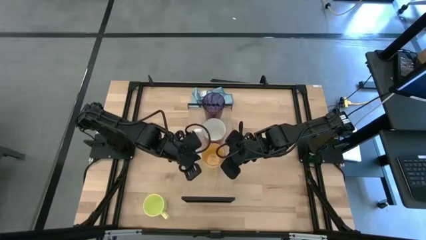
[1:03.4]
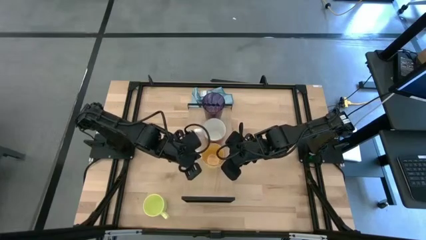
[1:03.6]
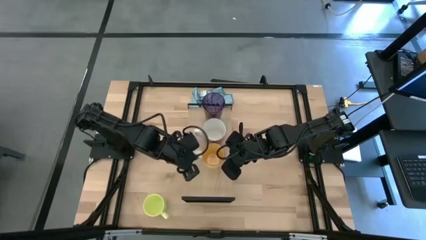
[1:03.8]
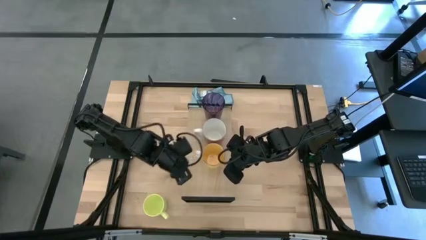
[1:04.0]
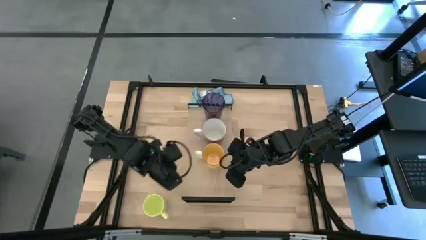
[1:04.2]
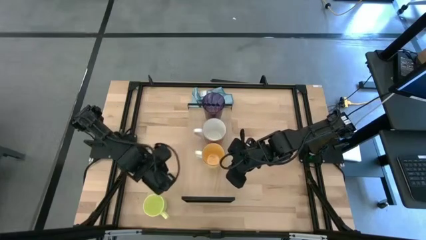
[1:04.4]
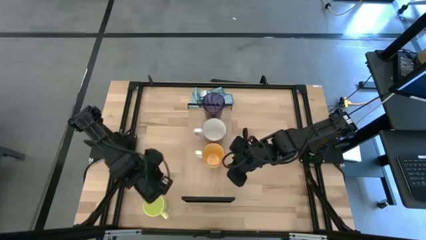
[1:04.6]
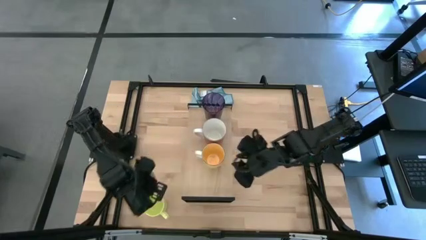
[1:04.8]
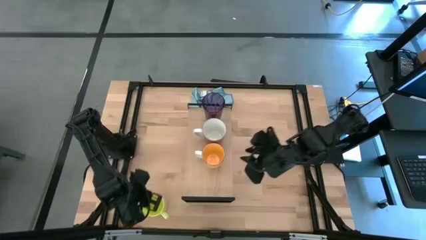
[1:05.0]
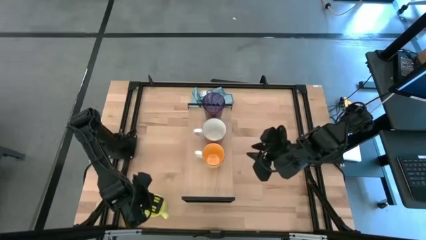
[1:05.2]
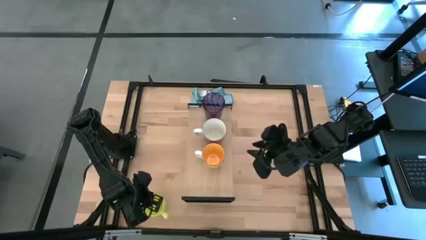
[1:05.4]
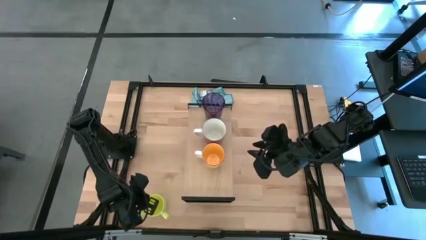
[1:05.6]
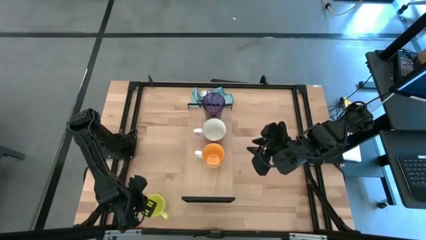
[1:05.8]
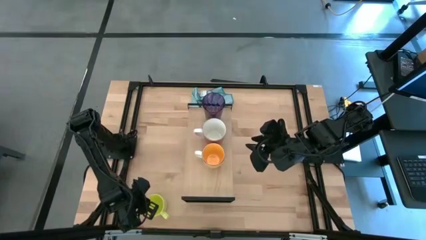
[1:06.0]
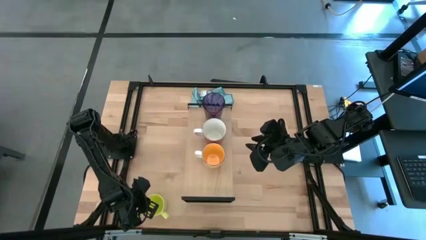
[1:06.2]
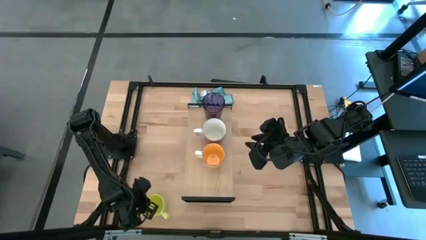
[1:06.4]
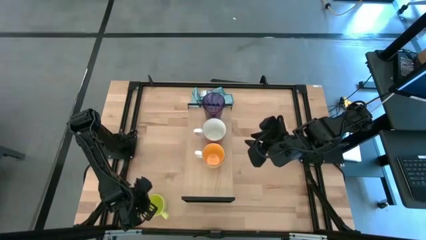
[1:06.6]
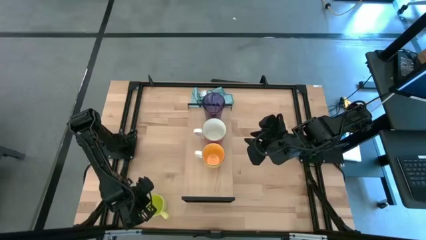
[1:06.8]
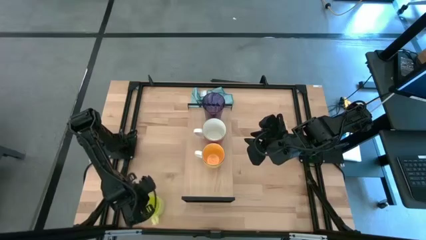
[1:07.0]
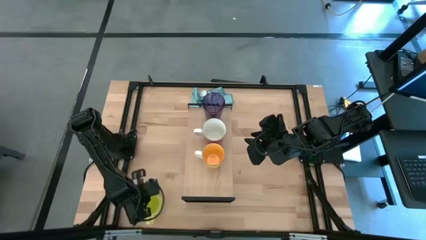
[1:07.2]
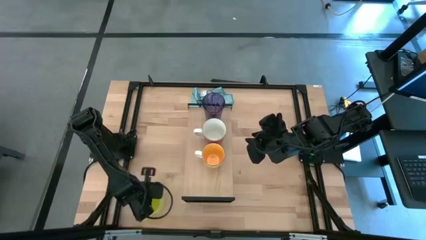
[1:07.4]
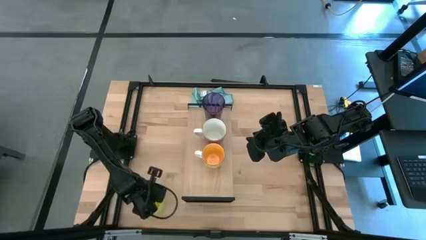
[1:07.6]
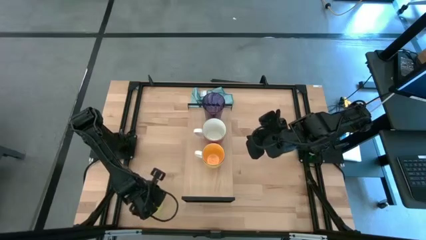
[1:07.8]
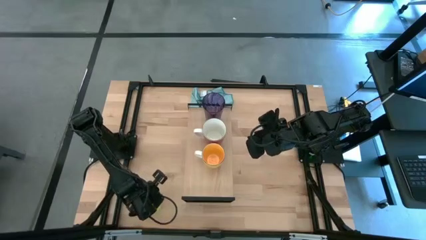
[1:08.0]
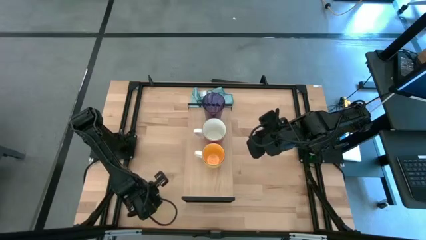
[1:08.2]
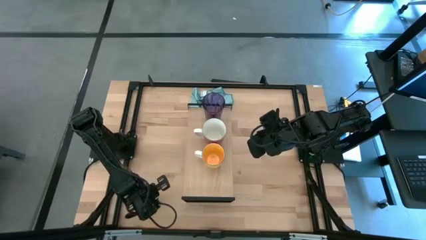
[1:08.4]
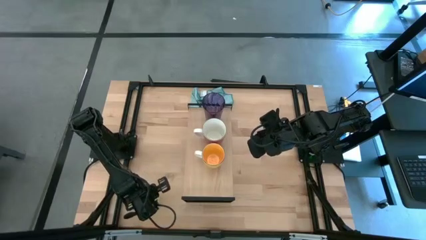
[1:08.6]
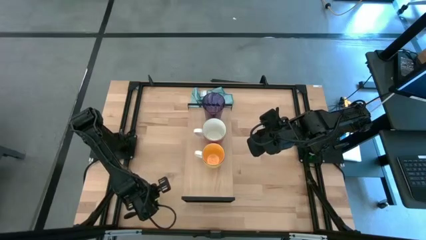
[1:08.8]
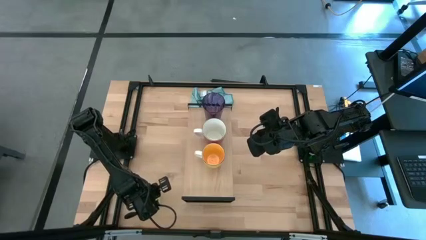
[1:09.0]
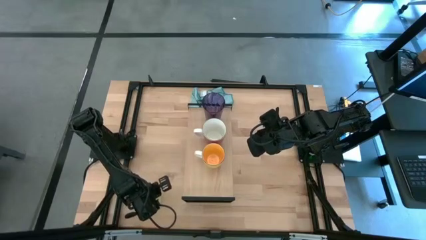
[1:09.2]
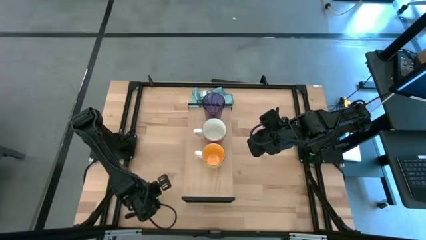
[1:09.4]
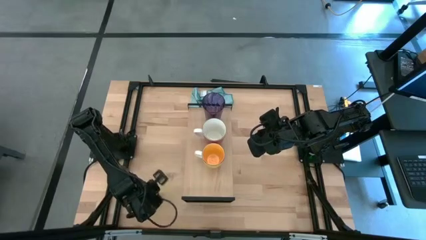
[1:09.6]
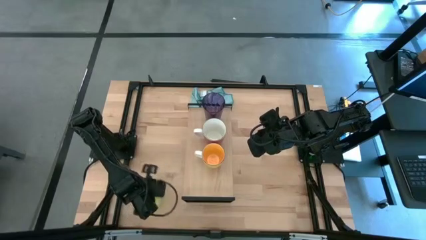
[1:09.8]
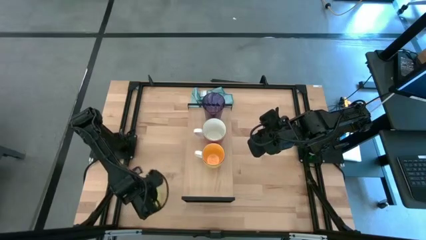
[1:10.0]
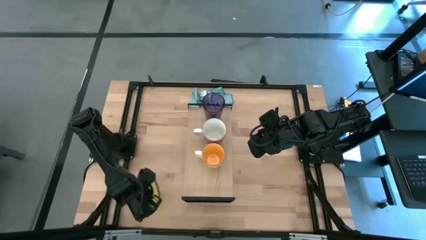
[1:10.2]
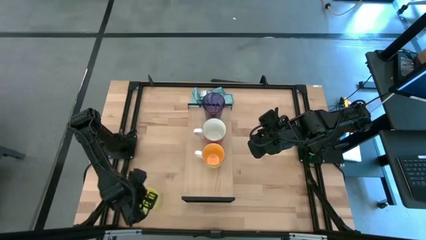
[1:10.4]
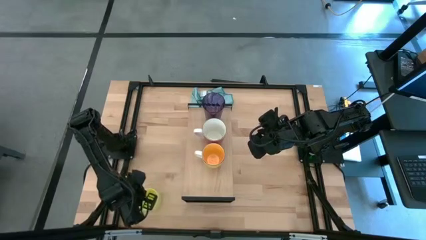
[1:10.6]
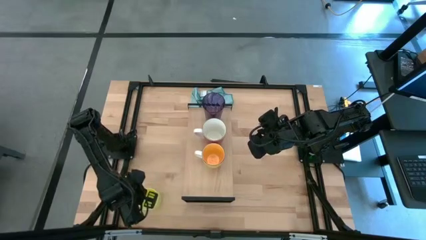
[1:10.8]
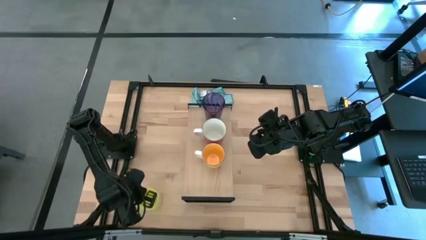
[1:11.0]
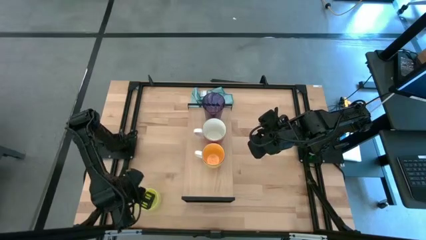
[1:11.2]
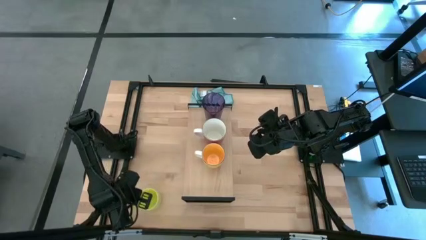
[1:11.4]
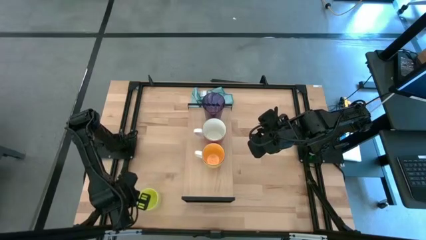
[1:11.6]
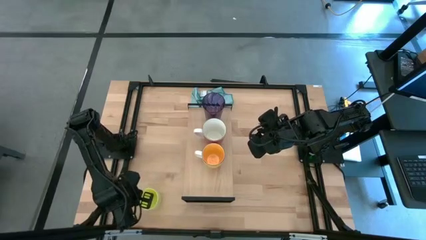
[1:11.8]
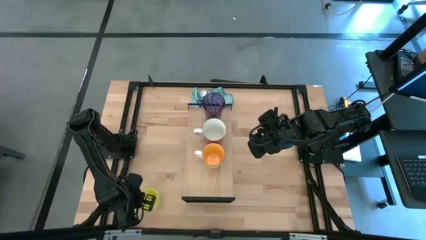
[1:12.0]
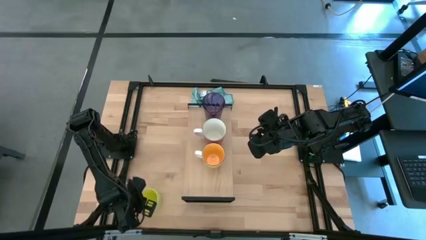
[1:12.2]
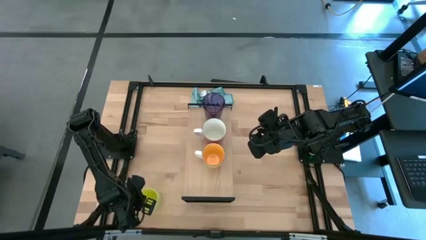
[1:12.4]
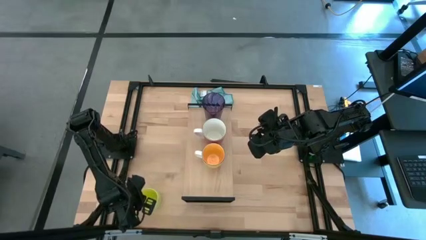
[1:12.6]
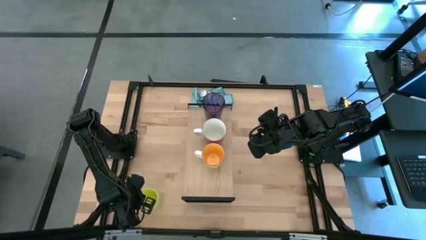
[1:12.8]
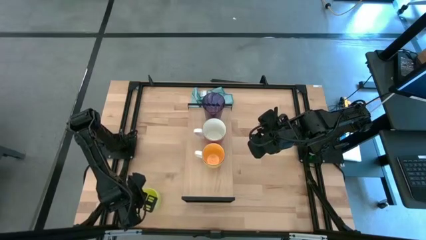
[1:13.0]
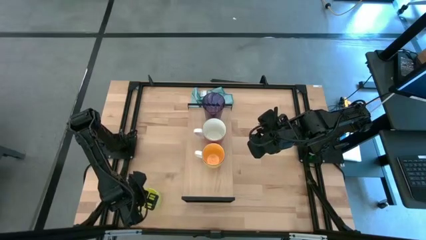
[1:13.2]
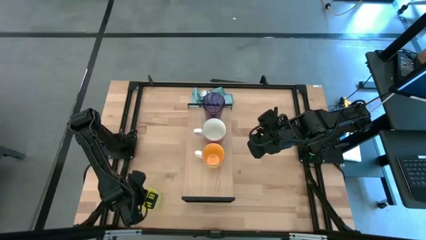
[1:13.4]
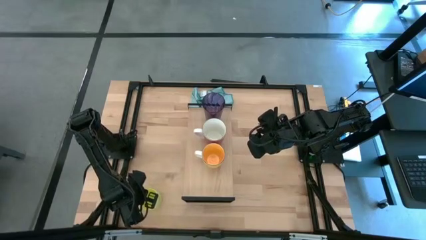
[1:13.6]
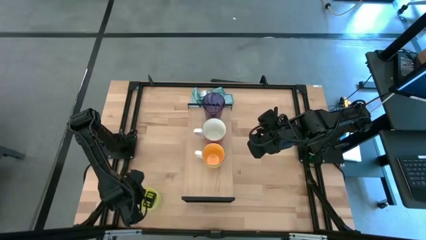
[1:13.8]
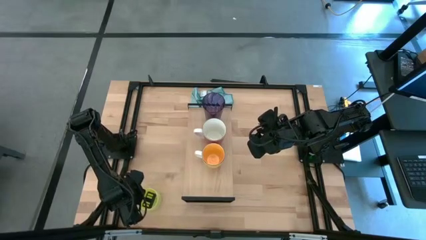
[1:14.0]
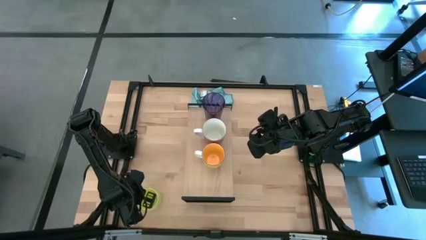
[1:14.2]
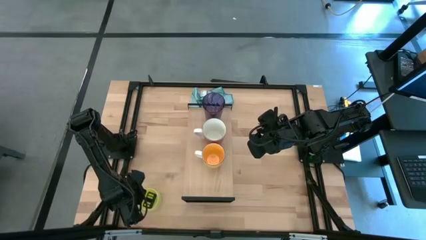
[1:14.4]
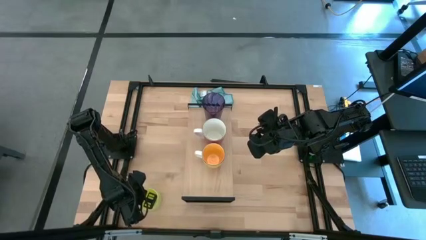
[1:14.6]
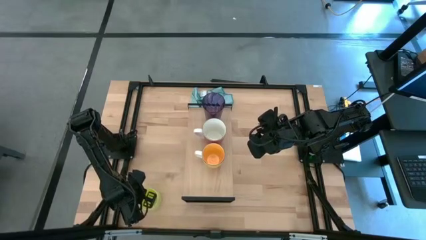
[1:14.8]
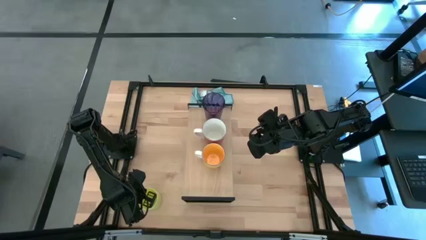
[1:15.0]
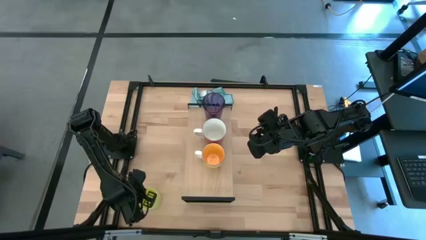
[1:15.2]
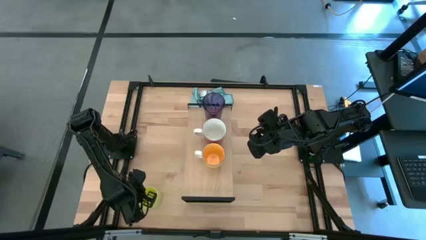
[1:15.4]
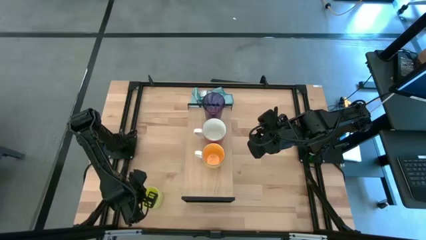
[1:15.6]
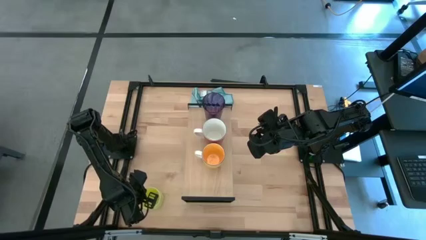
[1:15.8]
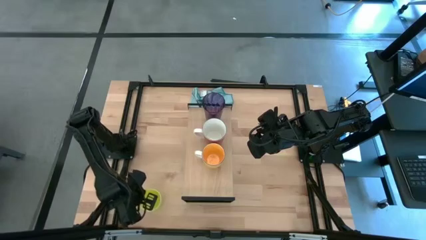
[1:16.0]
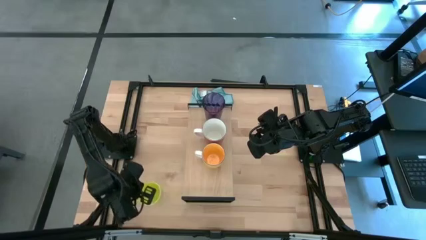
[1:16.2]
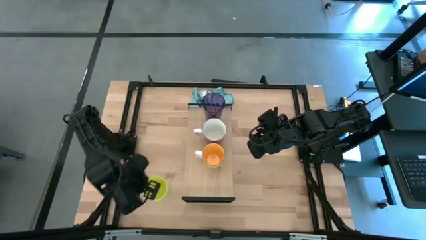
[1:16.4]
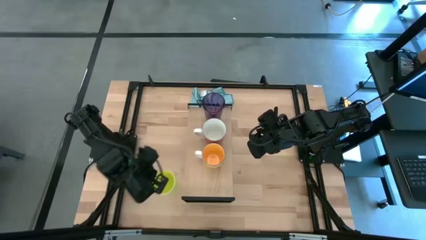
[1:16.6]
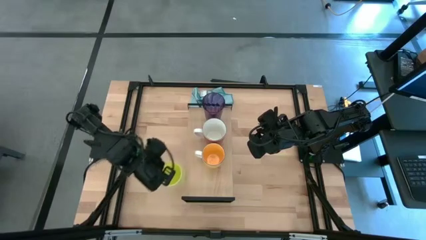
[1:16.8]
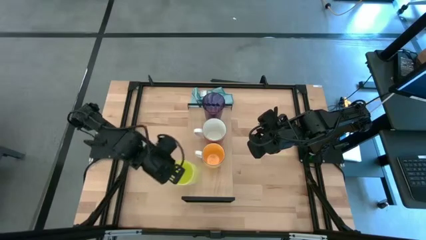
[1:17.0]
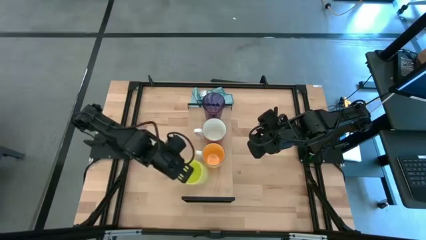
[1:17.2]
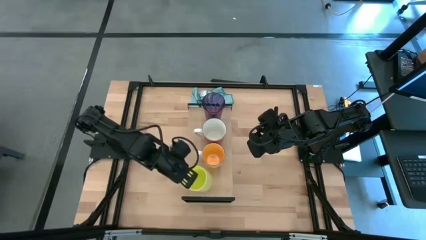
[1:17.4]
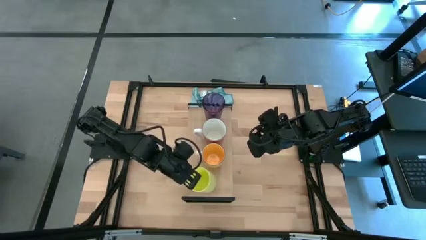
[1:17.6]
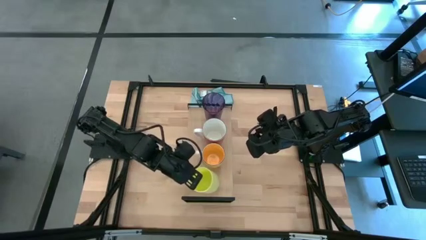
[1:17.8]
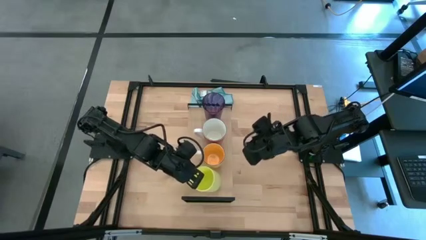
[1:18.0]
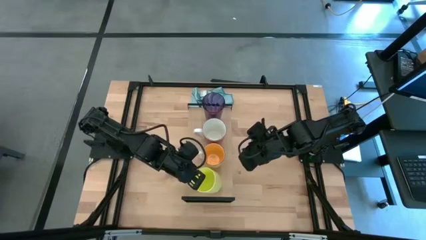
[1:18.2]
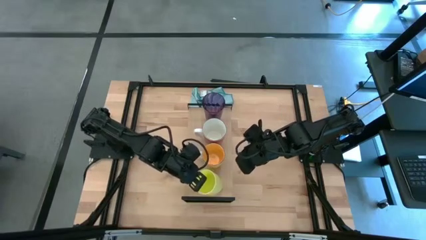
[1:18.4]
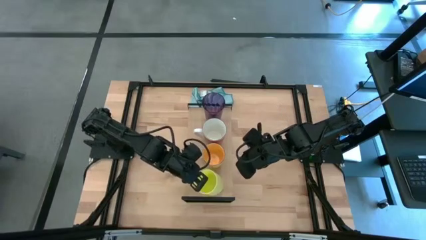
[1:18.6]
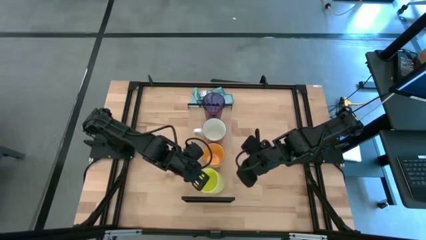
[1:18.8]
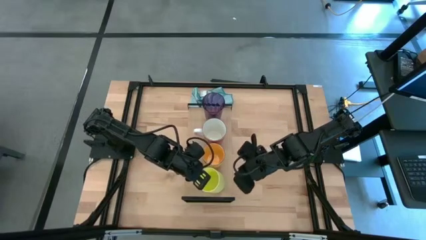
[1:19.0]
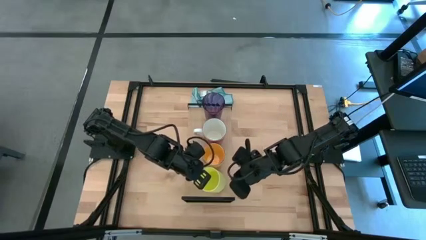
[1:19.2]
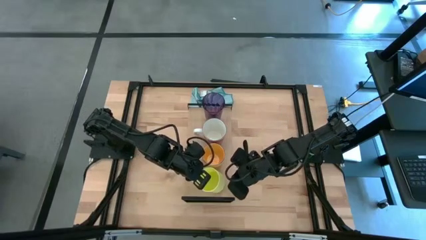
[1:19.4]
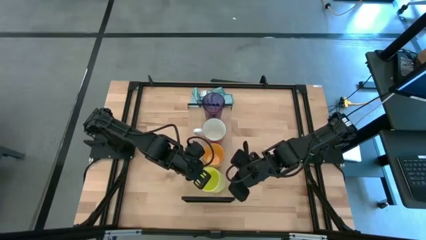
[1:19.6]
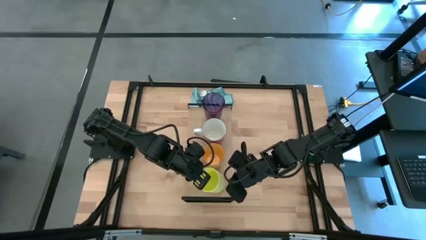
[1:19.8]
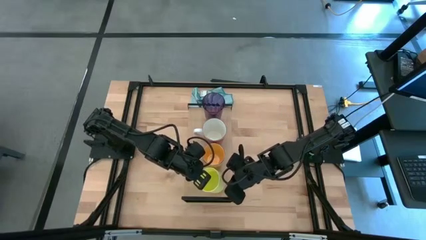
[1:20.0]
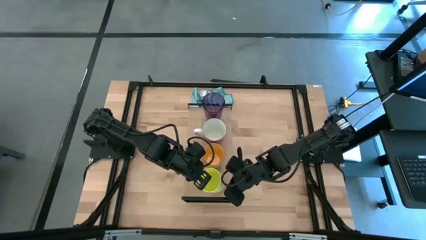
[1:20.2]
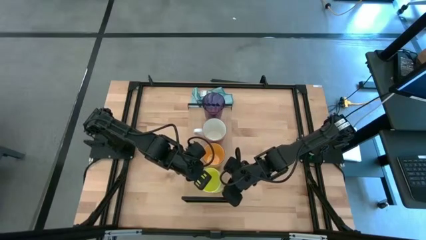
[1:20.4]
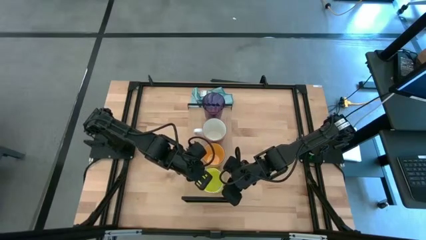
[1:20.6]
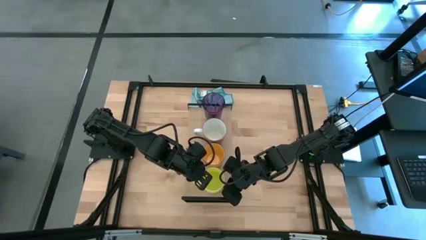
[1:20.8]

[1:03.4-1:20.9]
Task: Stack small to large cups/mugs on shelf
Put the light green cup on the shelf
